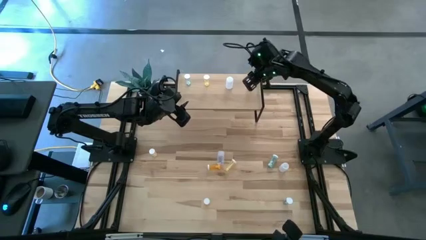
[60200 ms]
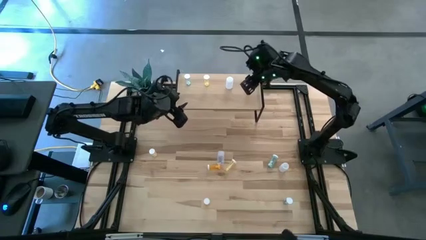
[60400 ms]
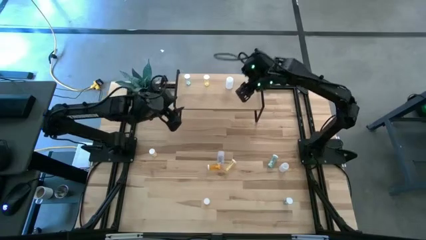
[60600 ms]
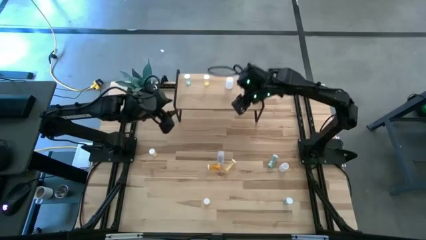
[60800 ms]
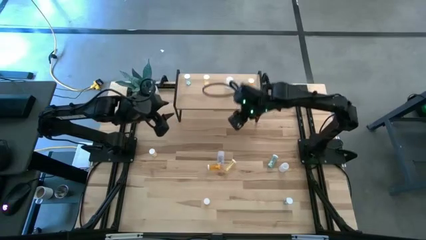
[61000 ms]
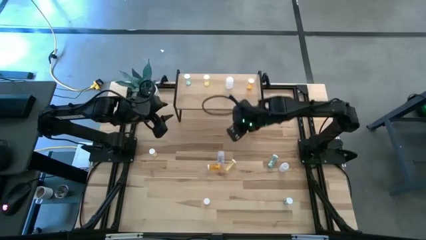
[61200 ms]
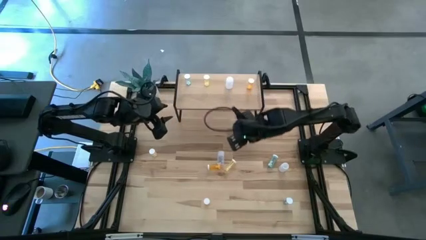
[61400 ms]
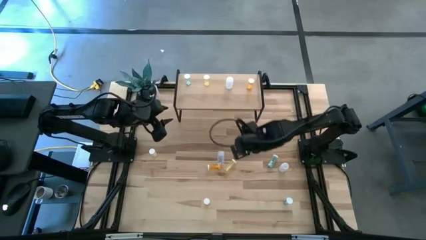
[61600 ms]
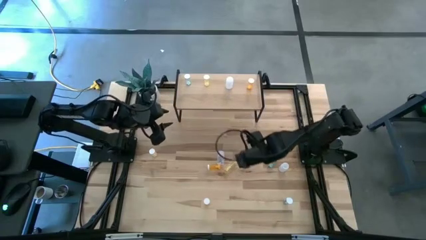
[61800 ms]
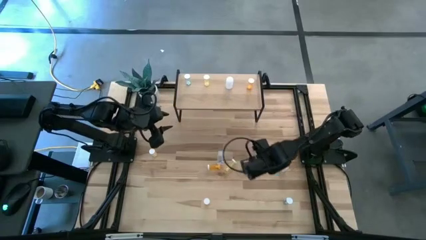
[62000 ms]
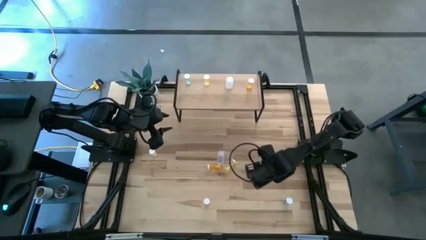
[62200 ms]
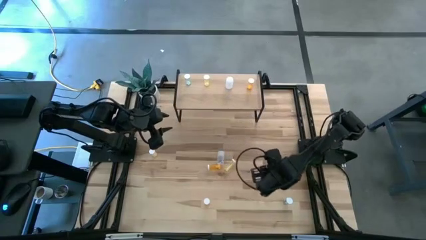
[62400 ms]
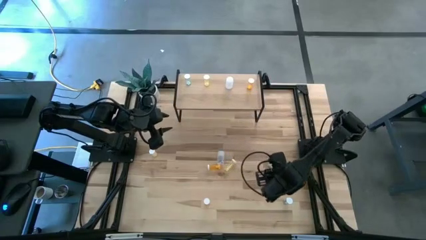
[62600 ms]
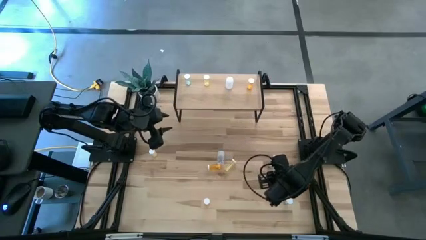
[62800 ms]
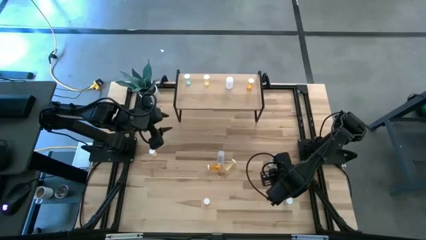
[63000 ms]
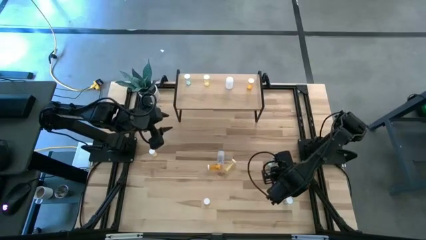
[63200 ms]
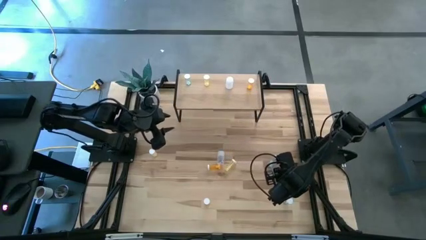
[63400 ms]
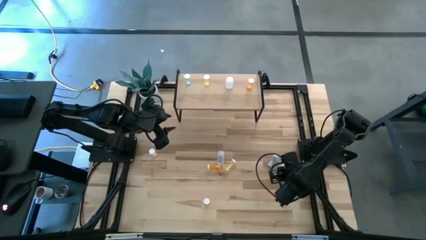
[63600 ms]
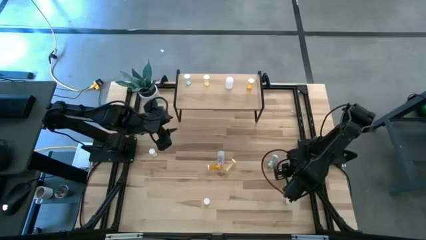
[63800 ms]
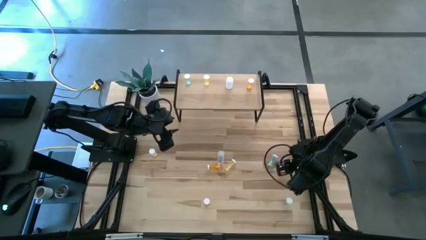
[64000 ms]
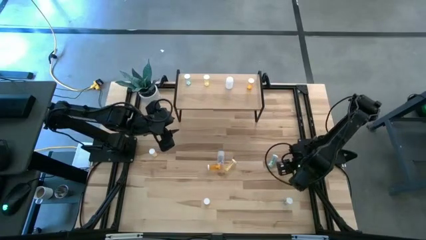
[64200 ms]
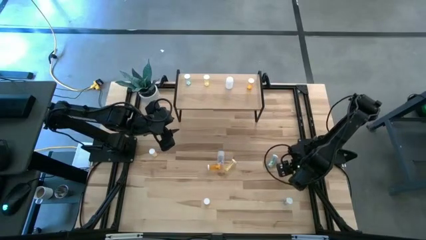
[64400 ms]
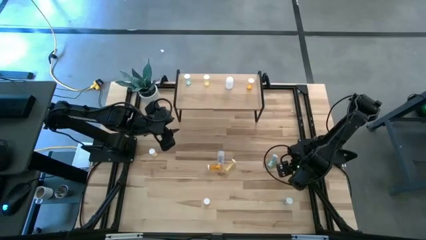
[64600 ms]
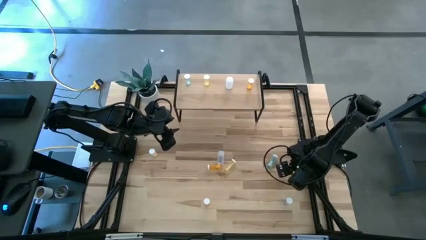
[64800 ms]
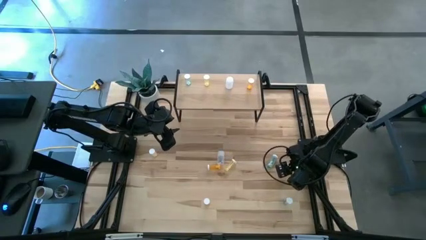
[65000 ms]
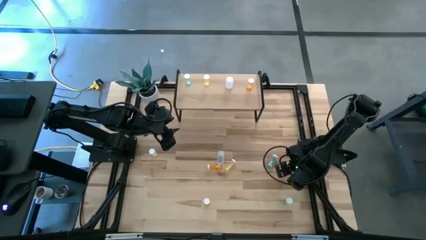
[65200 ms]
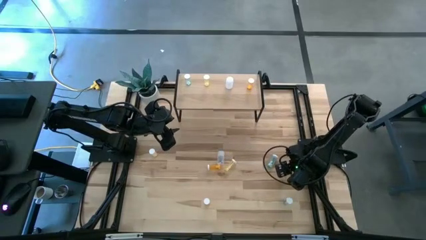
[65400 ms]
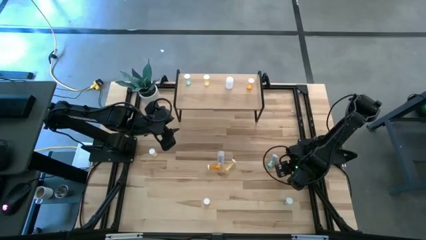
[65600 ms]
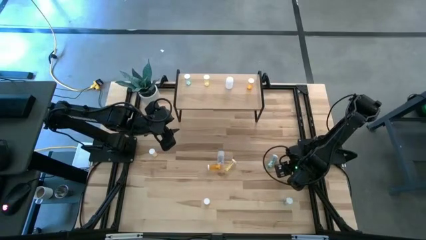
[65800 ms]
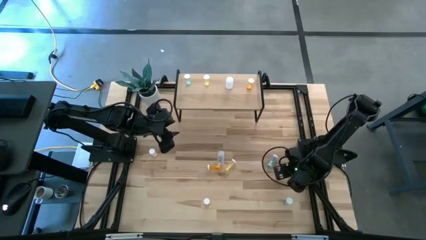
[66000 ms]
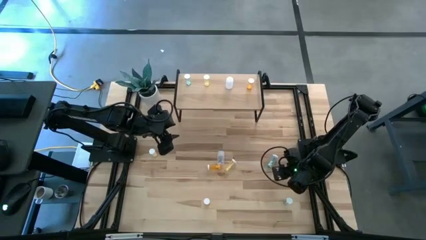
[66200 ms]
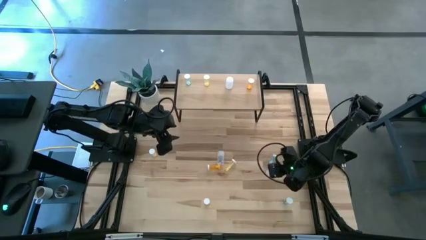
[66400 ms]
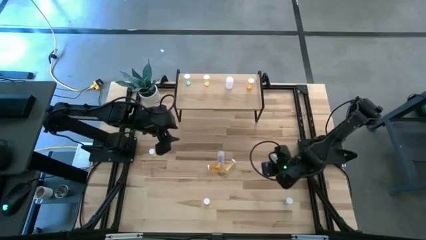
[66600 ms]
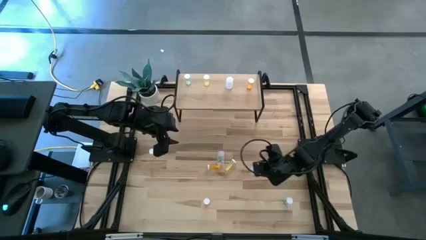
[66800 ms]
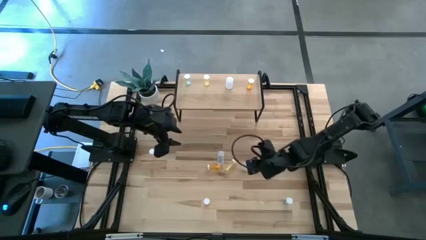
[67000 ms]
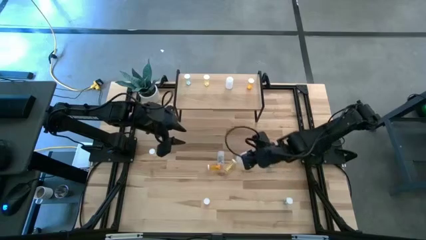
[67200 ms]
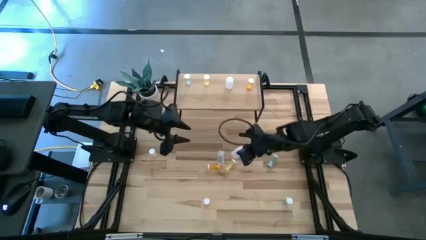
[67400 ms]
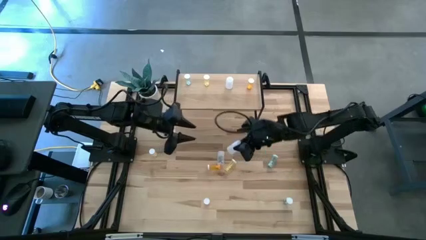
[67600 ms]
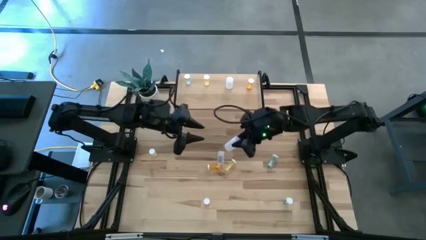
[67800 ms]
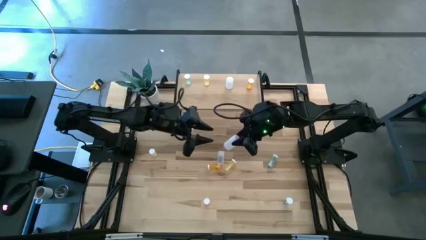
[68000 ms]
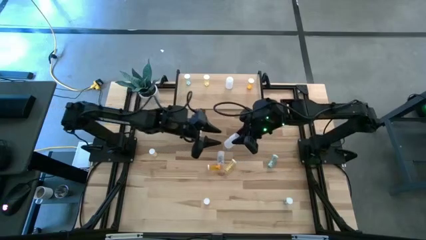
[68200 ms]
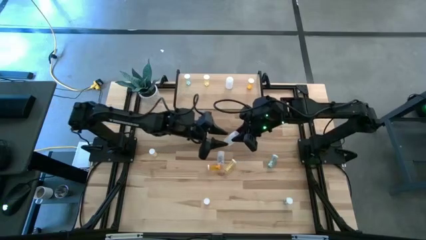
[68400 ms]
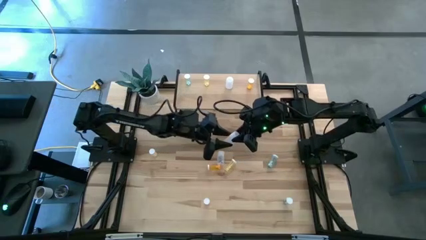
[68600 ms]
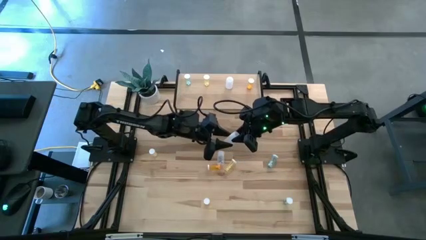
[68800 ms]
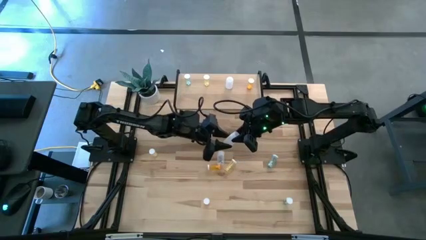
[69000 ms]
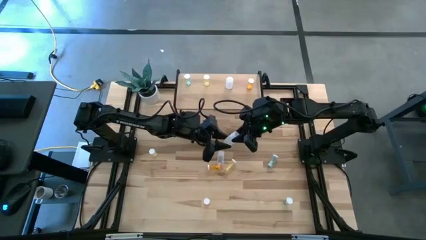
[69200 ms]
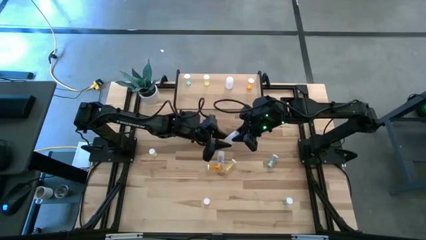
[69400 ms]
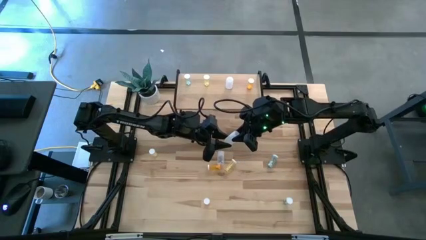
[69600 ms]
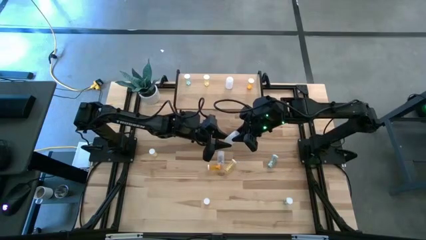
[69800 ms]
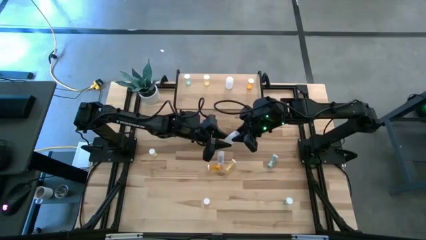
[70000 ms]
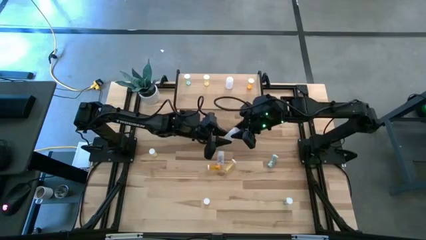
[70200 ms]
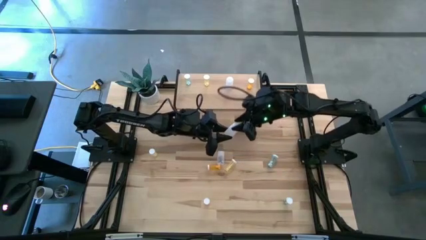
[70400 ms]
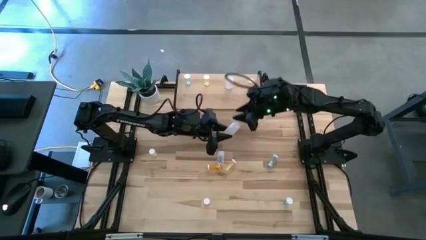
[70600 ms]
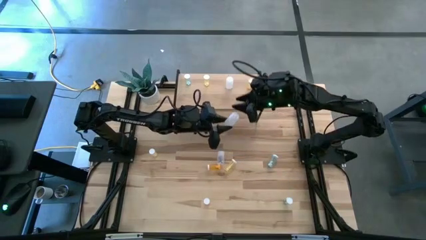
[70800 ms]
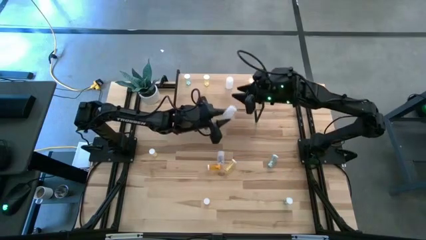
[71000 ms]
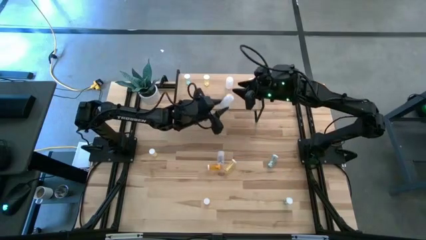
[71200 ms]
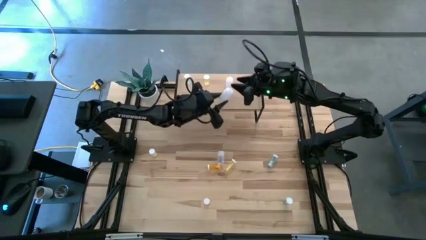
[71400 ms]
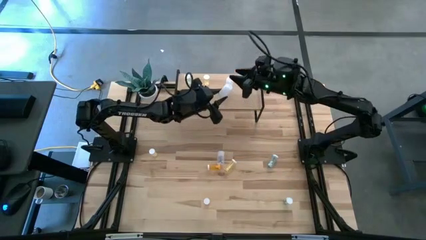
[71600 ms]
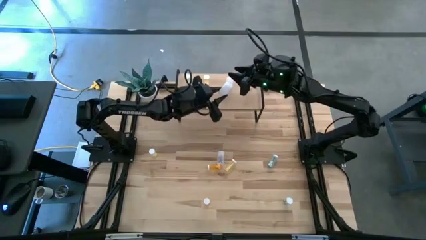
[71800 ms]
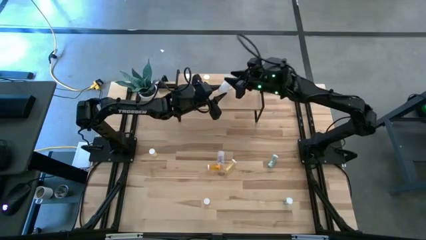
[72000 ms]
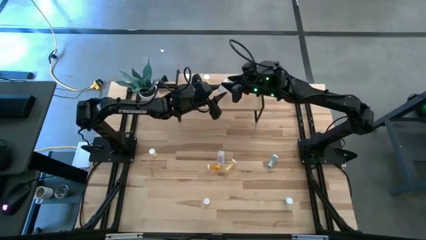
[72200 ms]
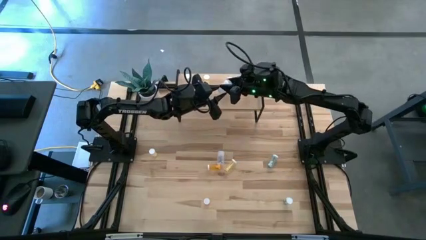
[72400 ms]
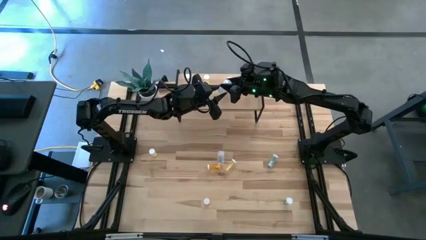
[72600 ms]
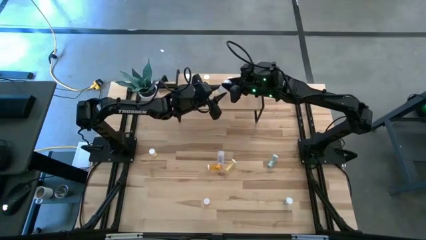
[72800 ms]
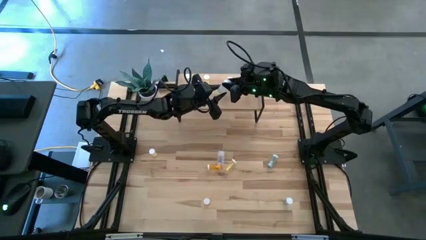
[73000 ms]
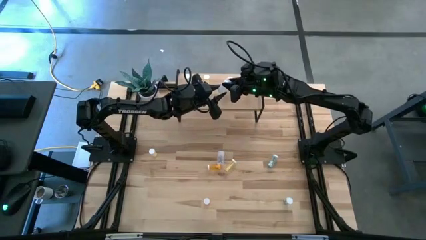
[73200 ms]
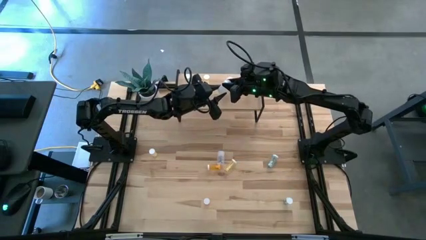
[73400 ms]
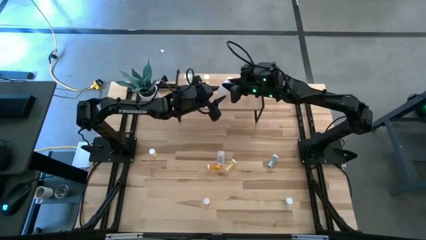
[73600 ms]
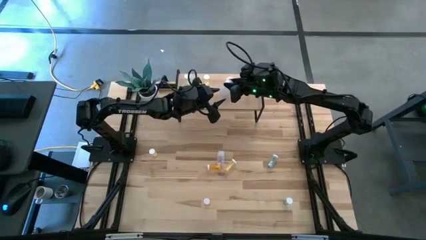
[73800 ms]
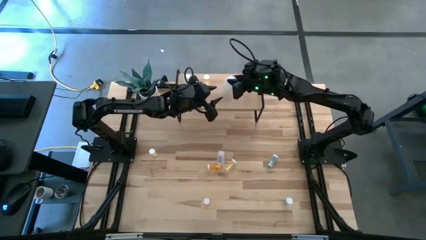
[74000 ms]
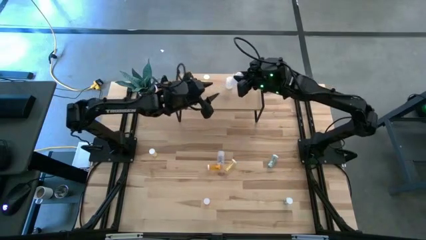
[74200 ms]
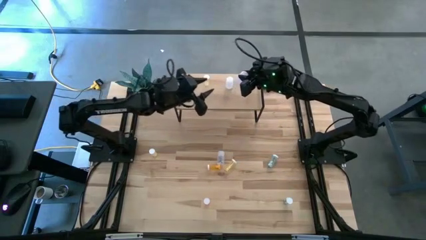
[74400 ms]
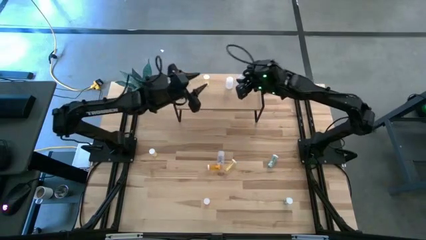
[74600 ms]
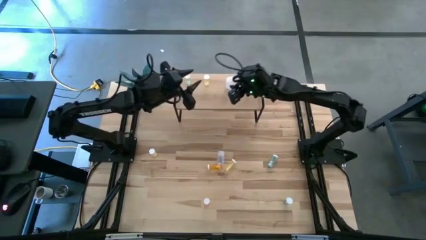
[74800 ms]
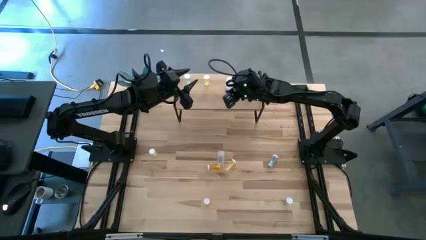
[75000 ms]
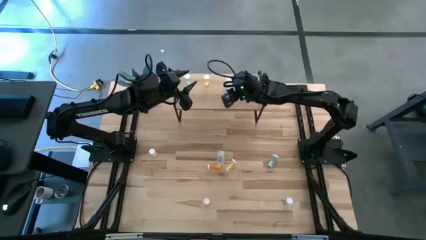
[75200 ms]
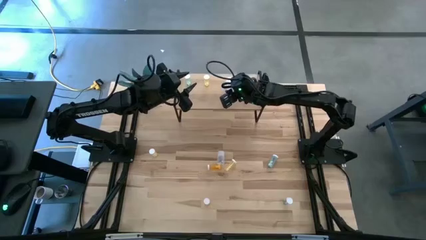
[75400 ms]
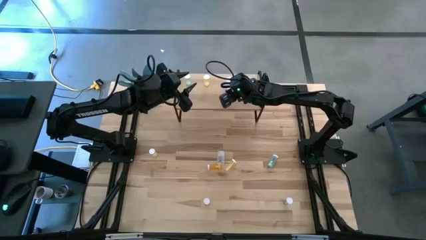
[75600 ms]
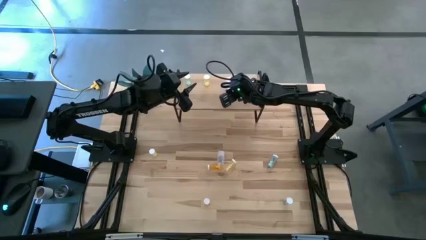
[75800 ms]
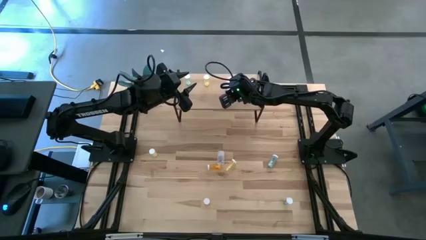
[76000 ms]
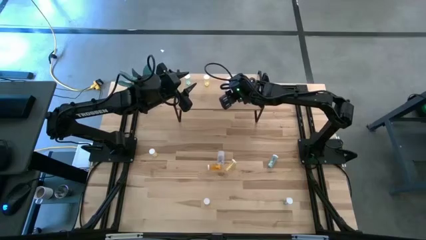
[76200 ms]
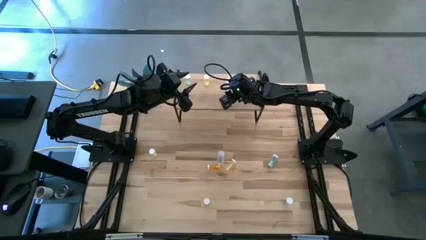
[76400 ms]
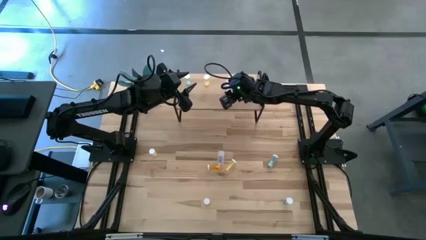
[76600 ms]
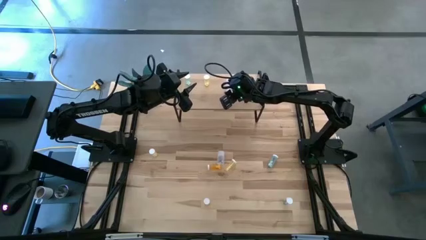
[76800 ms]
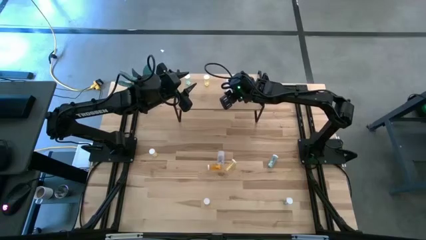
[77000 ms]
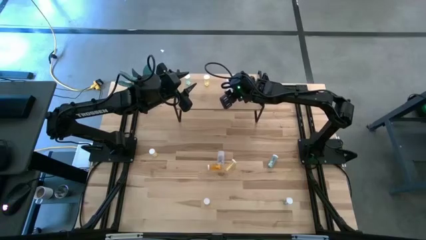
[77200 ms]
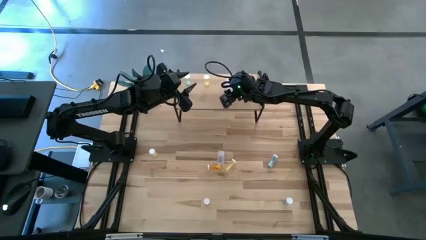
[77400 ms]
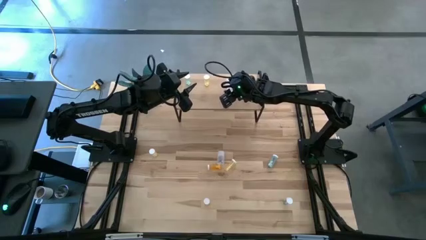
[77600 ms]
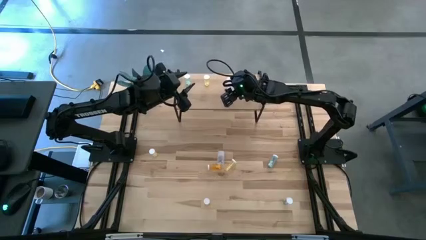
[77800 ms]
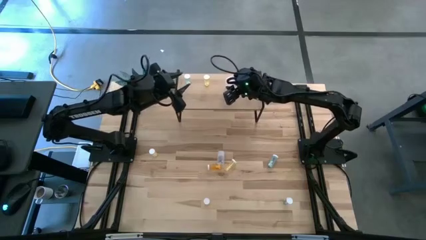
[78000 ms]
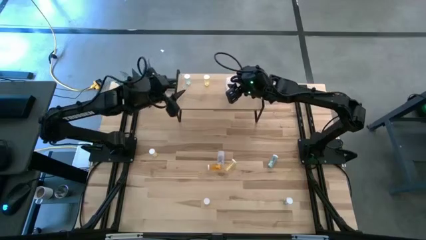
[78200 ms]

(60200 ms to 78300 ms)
Task: Pick and place medicine bottles onto shelf by color
Put the right white pill bottle aligned with the other white pill bottle on the shelf
